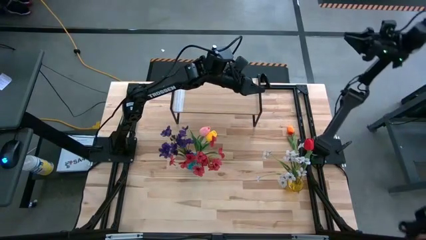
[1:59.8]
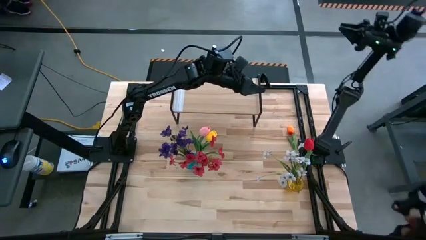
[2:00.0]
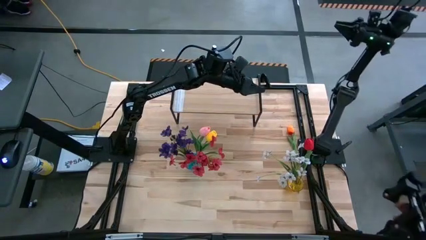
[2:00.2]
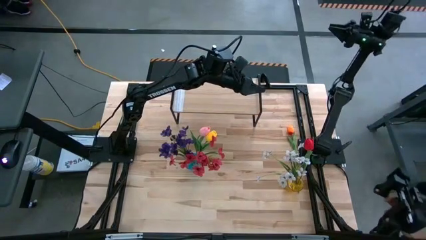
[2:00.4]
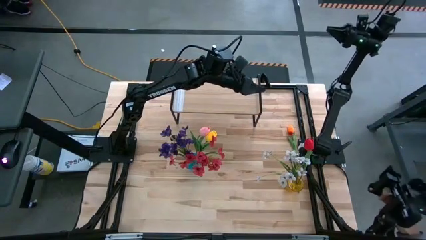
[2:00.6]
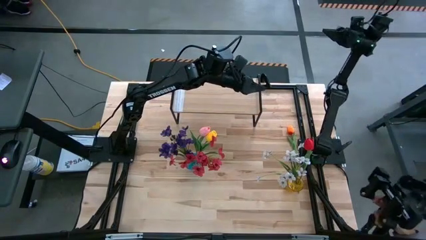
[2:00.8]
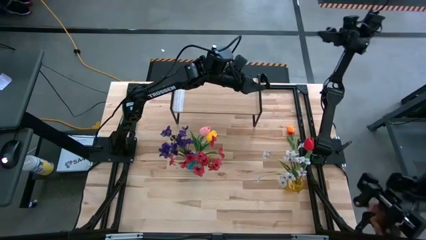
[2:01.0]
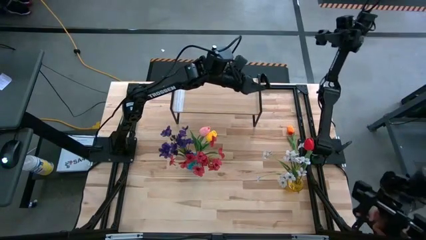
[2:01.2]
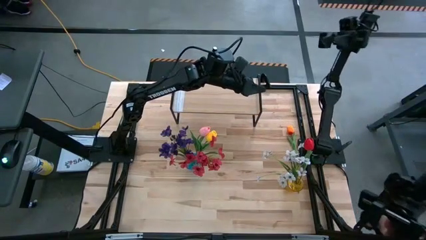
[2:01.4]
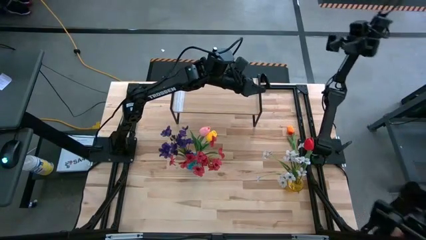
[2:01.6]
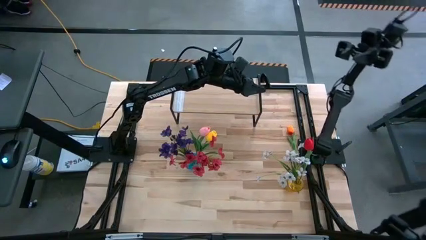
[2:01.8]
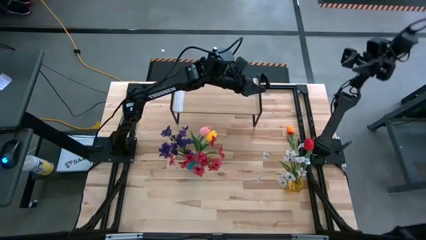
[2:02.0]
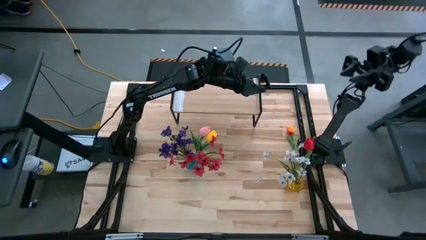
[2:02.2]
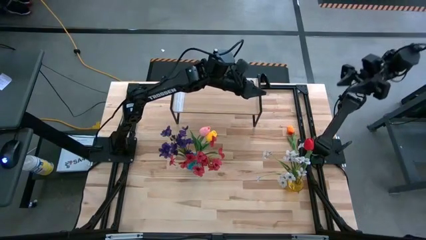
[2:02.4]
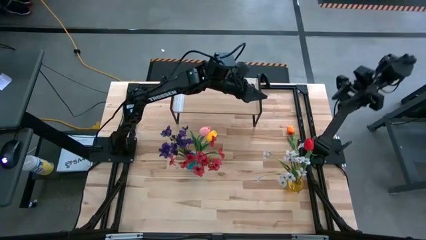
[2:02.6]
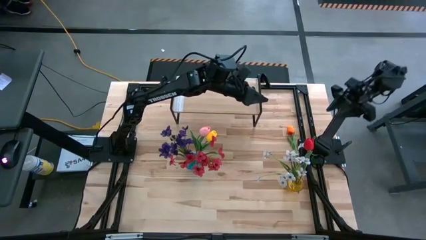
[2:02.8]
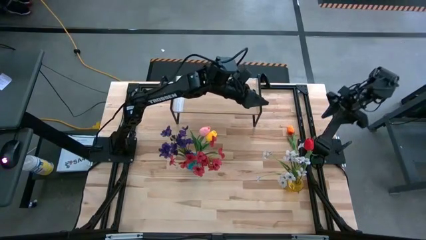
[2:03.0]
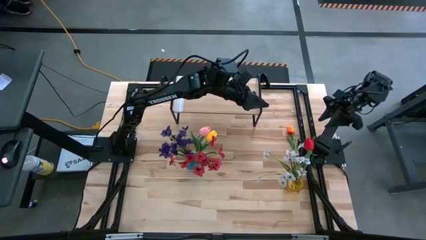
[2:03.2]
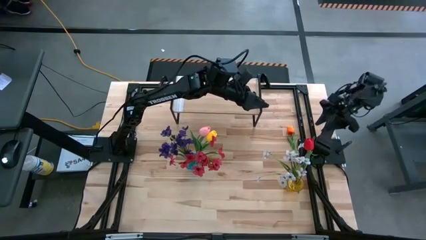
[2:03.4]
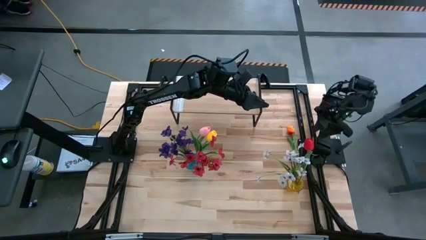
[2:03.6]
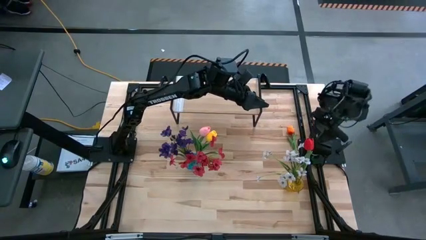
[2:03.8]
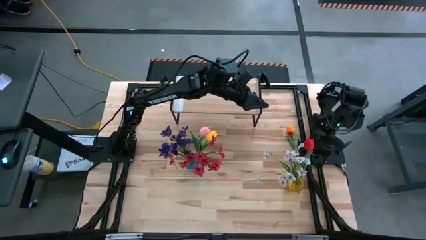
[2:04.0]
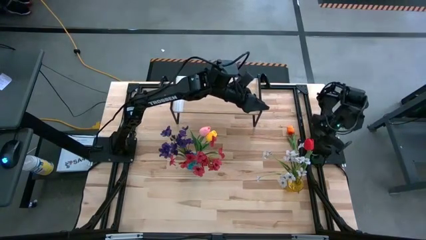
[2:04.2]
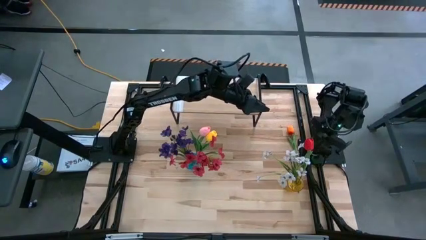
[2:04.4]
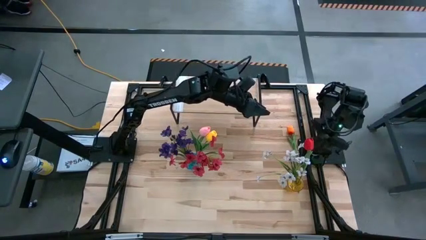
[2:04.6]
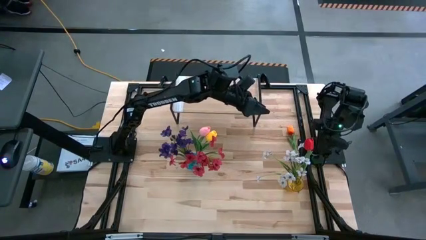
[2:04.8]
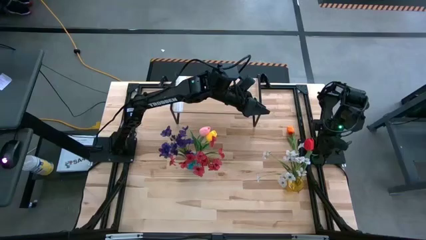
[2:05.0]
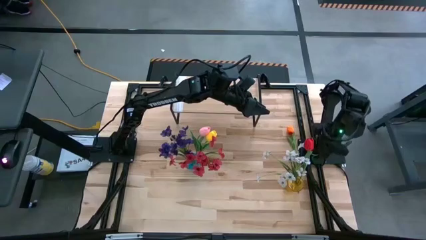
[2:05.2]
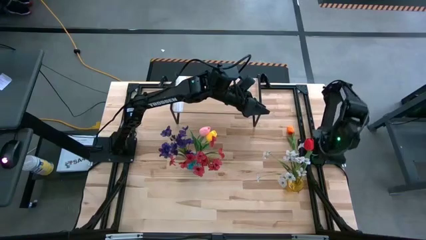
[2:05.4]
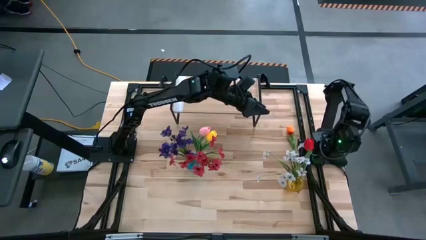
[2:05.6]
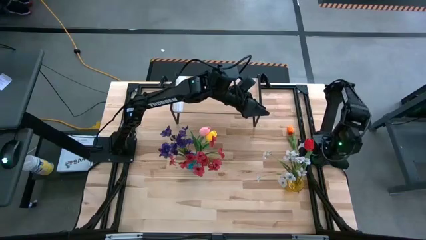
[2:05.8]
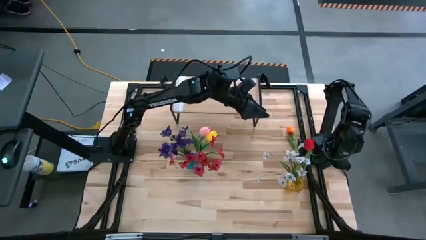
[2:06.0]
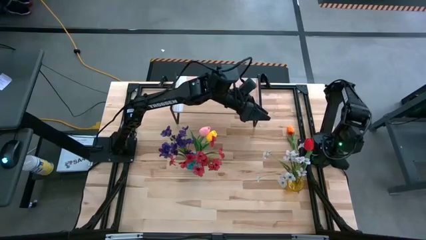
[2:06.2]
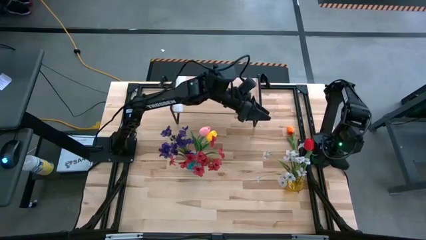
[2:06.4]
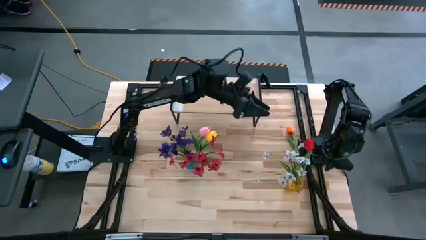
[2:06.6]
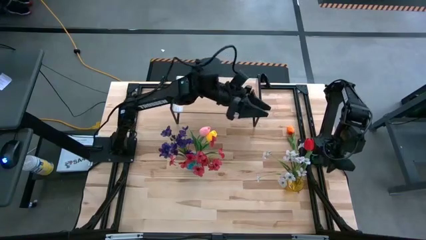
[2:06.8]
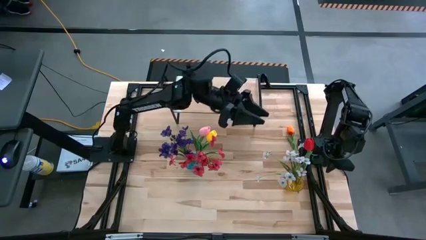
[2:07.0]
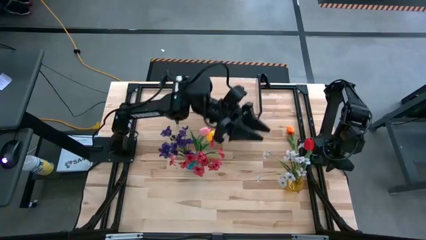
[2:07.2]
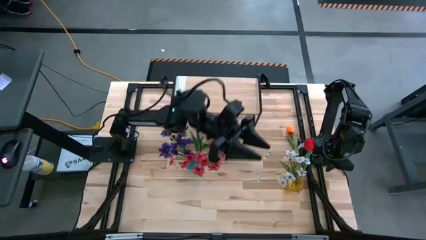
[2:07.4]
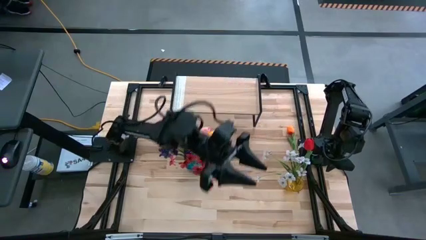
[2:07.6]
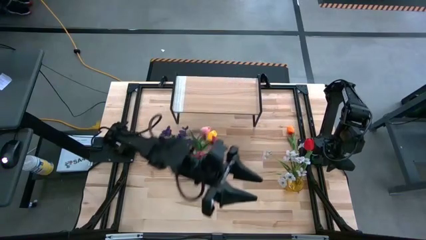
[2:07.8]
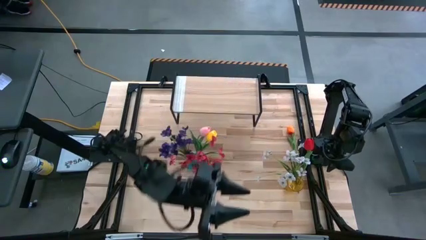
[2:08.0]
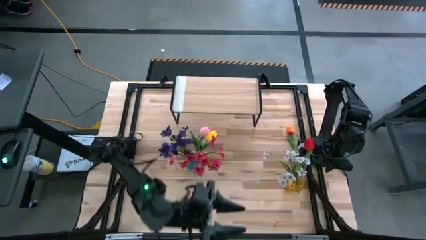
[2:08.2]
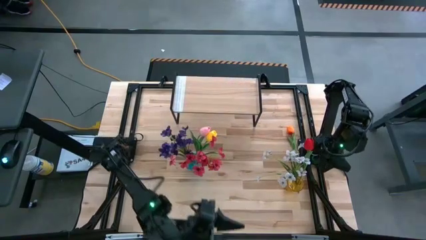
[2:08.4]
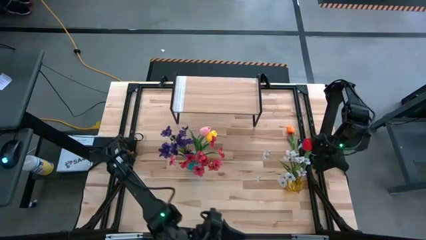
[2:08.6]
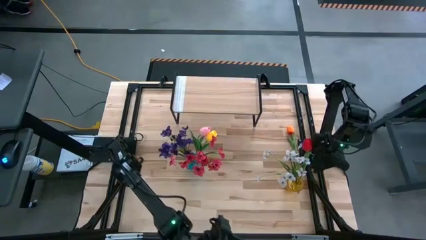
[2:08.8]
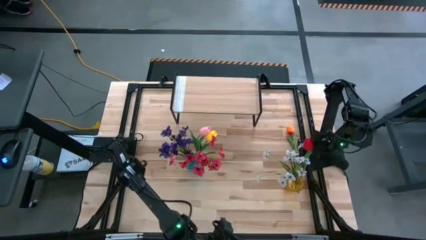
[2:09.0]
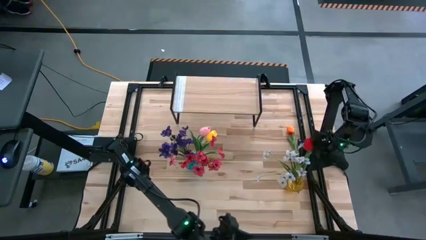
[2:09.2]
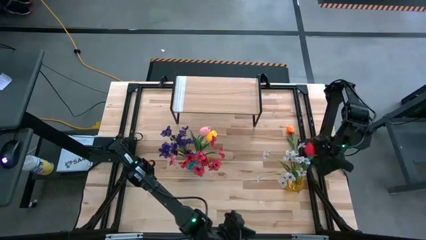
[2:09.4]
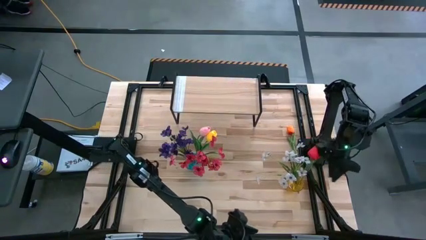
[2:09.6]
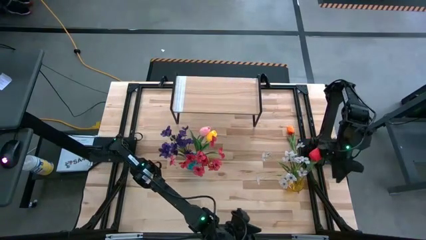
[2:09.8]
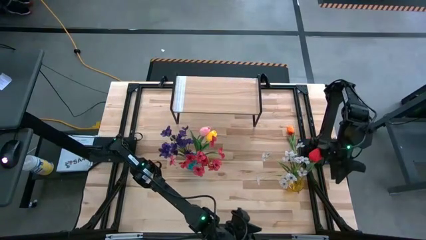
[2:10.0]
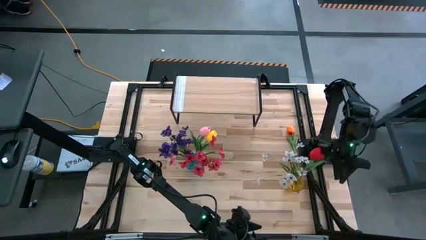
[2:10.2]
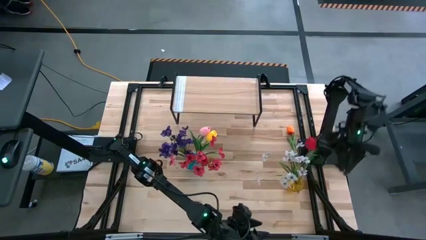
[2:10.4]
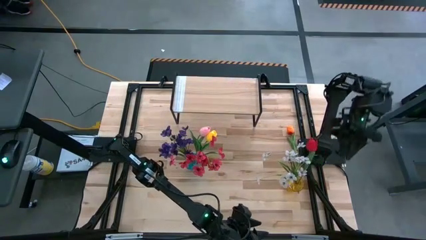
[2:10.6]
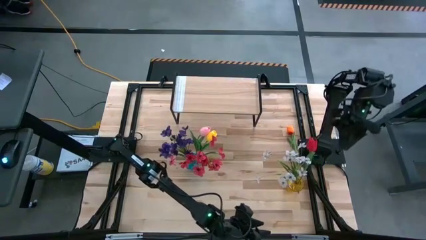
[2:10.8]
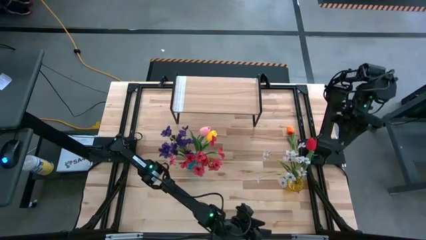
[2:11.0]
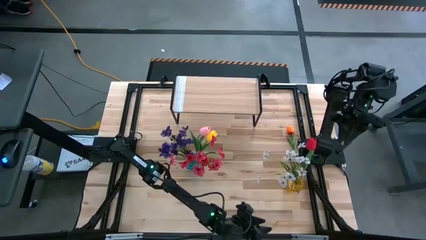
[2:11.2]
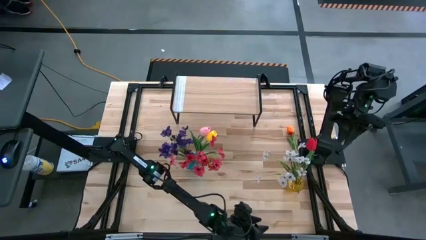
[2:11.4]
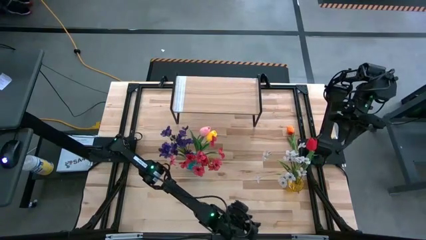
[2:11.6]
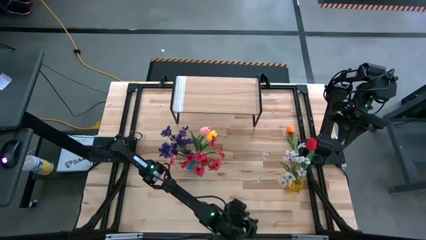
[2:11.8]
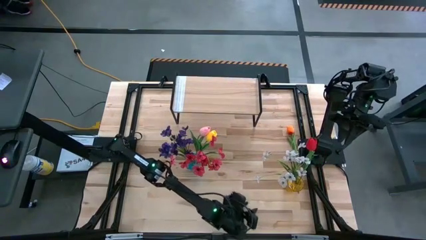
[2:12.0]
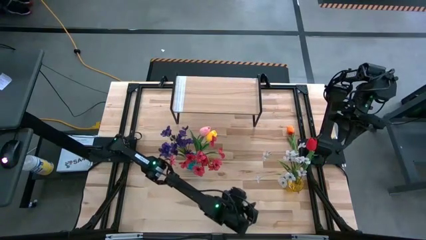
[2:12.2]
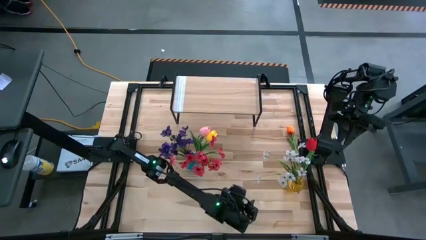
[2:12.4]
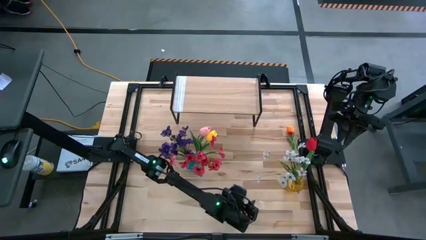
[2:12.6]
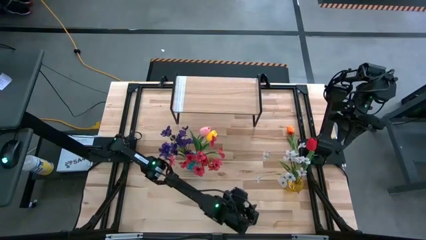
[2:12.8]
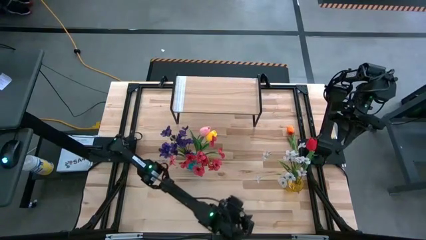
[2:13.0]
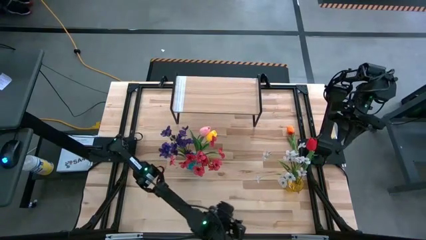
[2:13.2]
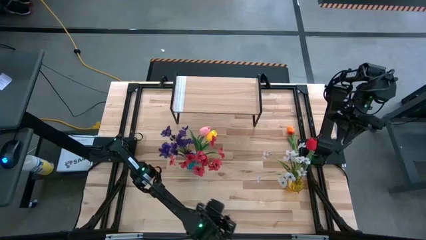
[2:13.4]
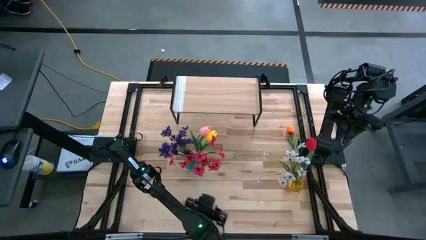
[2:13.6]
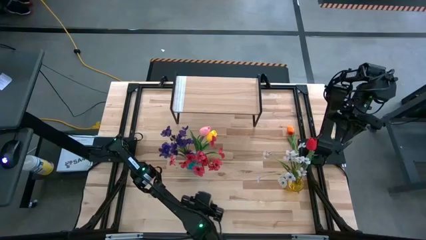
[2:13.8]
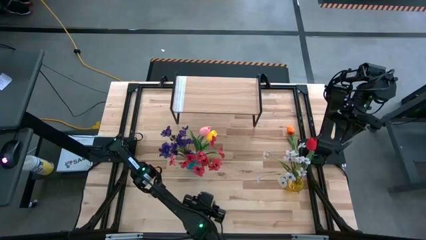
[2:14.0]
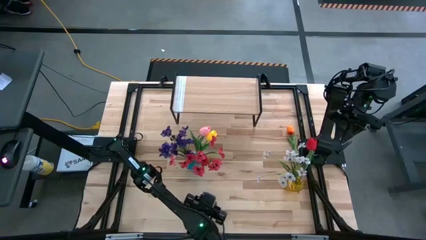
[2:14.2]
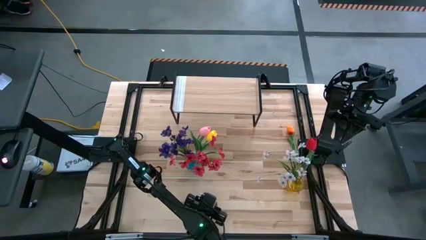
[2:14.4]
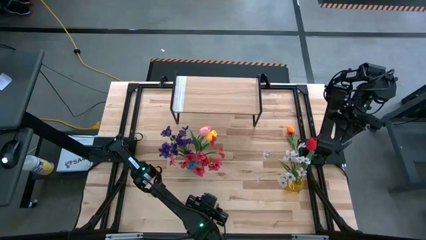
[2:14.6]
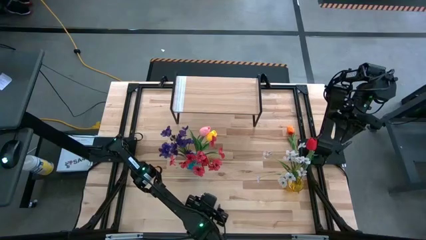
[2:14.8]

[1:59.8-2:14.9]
Task: Pick and place flowers into a vace then onto a shelf
Adjust the vases
